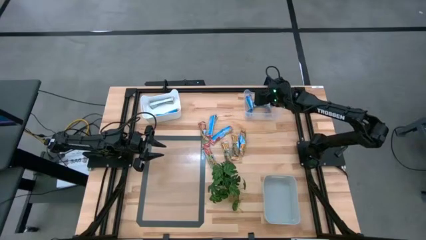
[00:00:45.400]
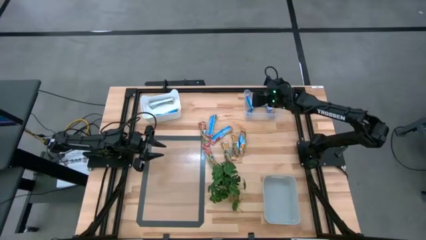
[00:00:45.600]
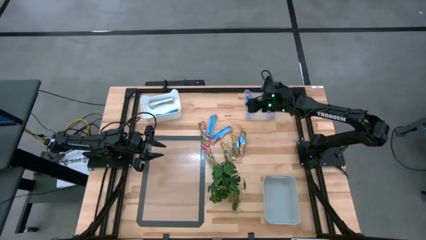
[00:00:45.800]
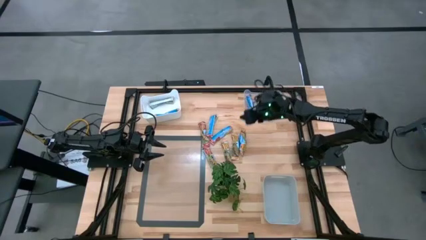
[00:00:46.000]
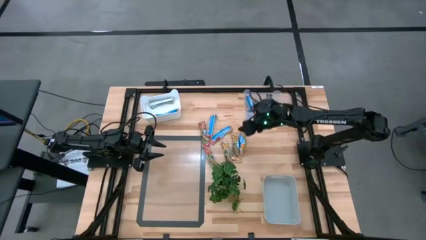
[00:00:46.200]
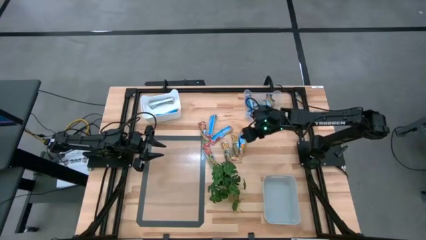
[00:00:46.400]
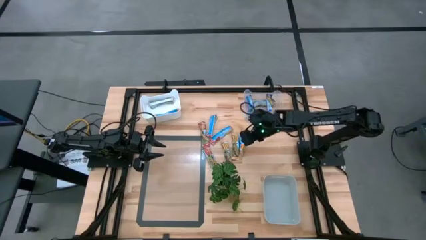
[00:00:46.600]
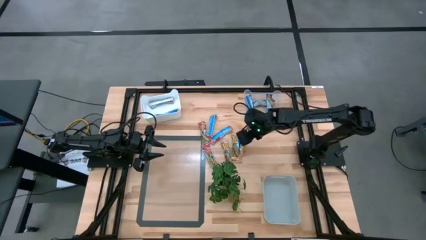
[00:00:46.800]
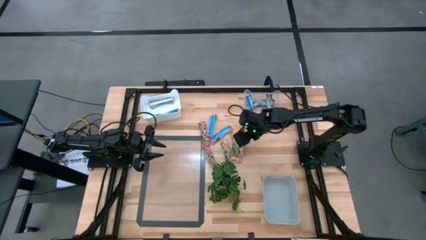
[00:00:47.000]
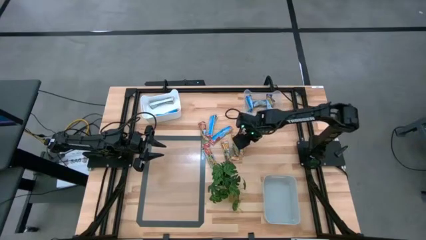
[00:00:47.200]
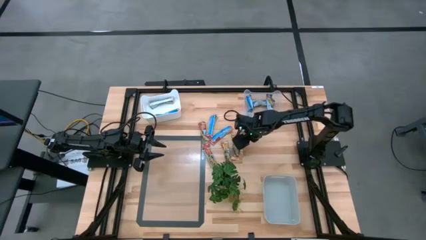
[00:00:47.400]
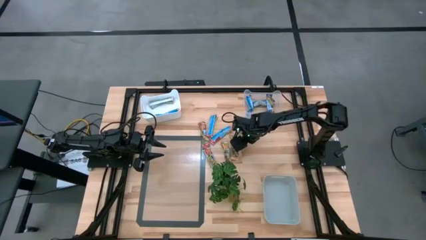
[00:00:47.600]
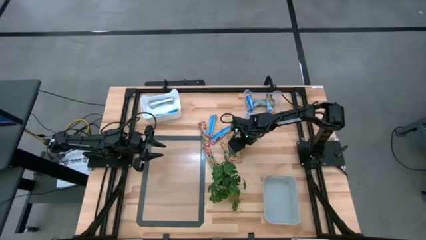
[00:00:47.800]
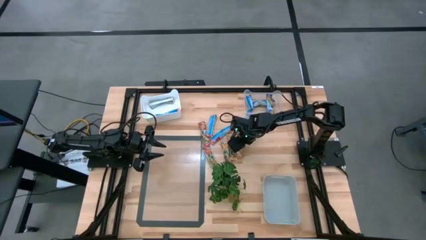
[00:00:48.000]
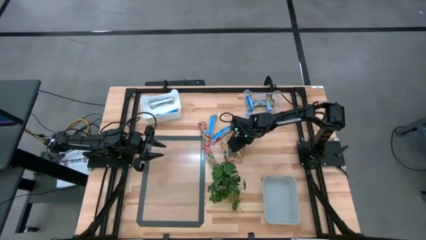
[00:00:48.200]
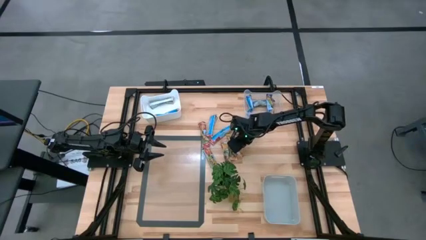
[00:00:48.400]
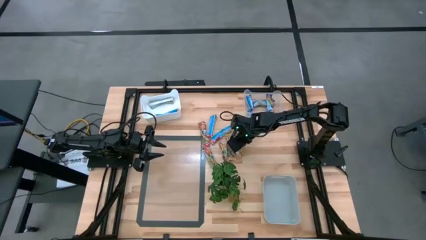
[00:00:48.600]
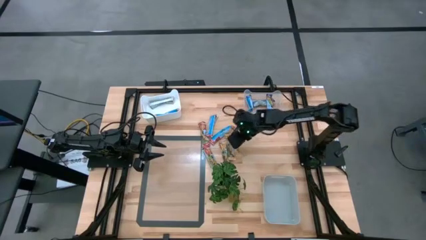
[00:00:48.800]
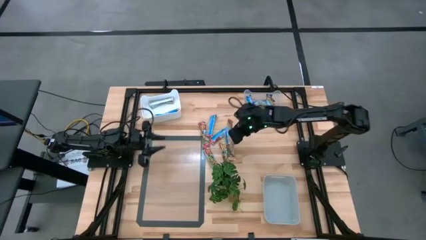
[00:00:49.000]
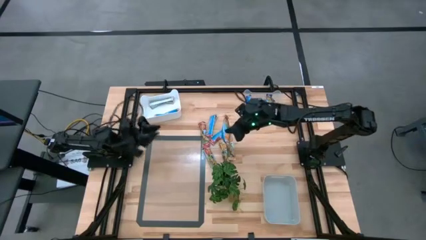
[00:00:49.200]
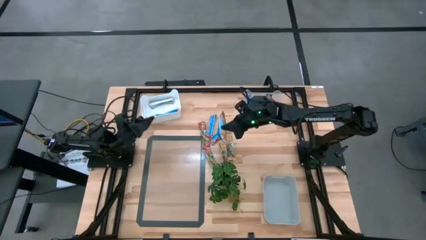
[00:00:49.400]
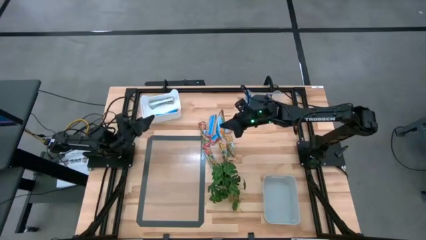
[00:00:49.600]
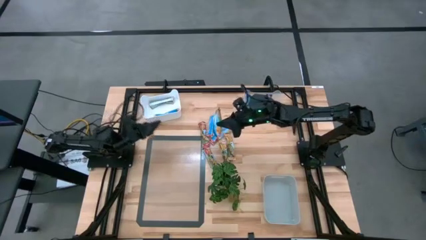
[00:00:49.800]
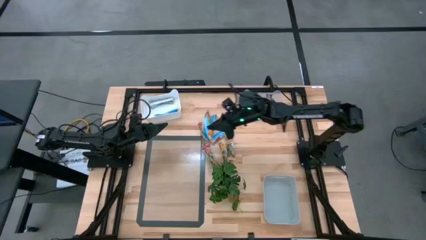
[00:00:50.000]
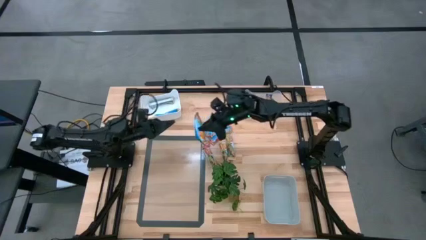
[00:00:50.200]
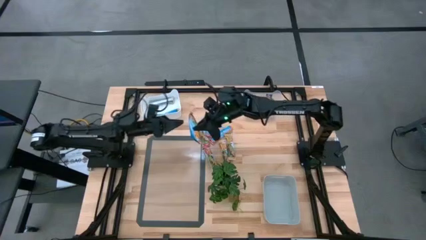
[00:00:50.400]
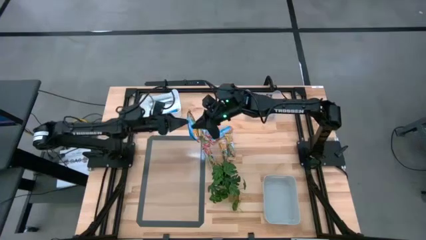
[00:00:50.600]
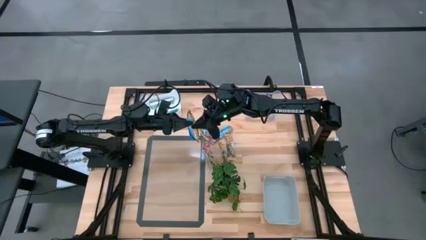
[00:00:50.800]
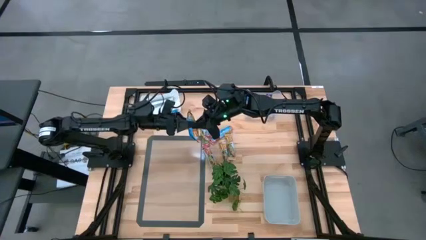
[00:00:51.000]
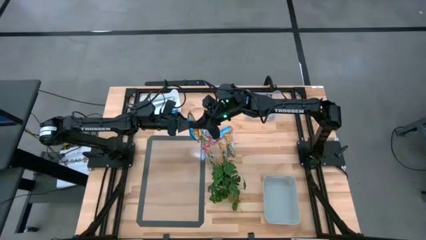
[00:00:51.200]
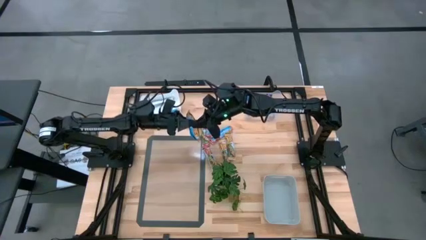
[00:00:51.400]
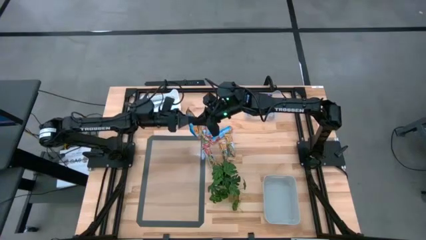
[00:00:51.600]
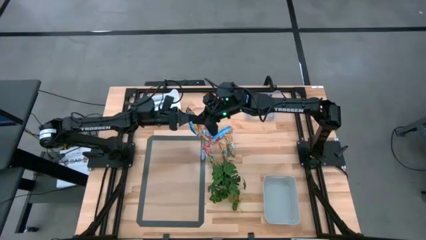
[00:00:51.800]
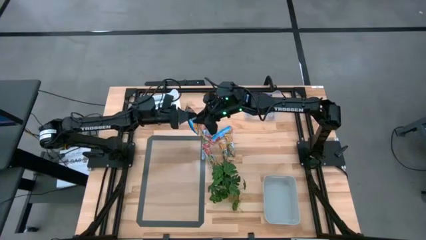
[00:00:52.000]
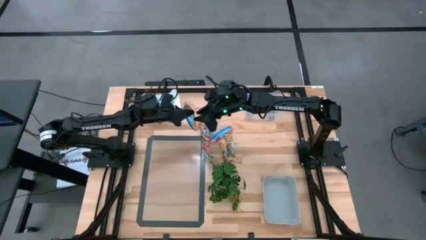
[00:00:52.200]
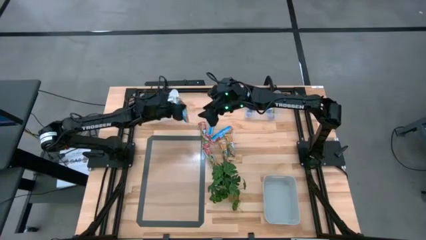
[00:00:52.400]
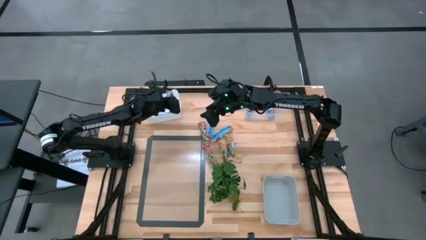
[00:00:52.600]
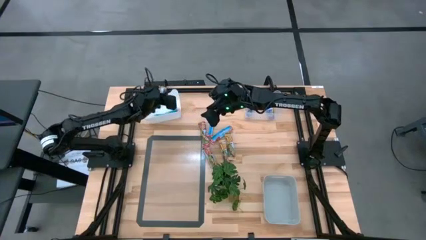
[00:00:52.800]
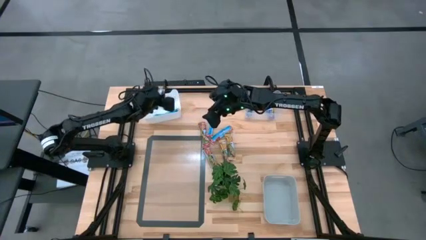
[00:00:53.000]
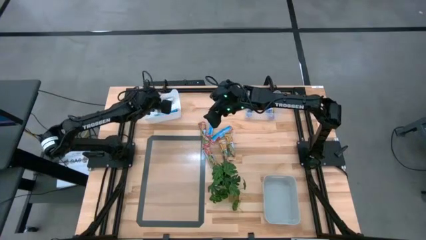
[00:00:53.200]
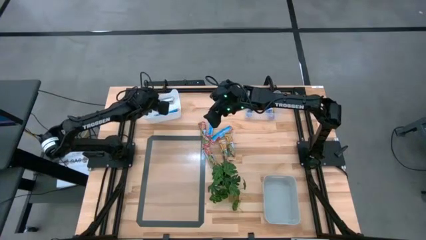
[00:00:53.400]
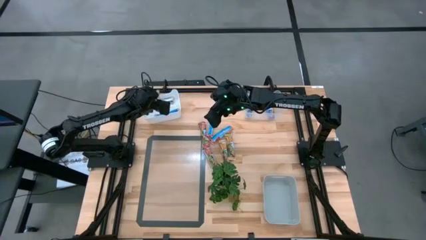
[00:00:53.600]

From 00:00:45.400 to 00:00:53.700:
Task: Pick and place Granola Bars by type
Put the yellow granola bar into the white bin

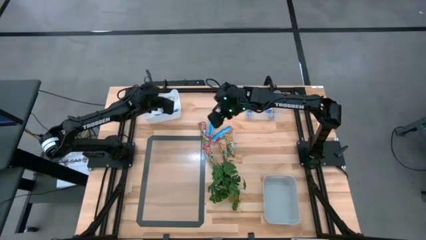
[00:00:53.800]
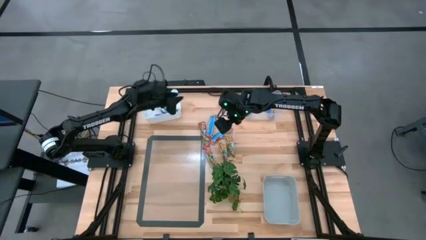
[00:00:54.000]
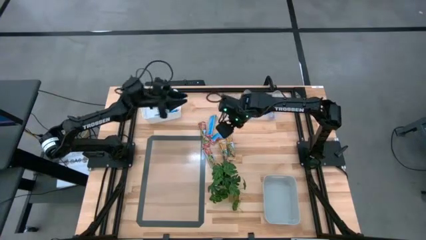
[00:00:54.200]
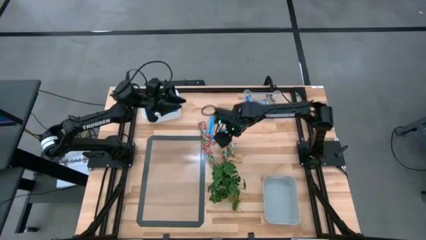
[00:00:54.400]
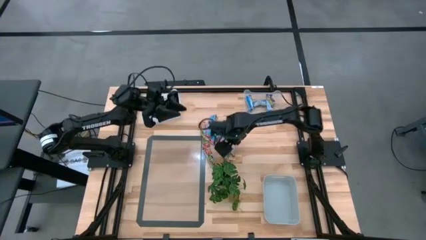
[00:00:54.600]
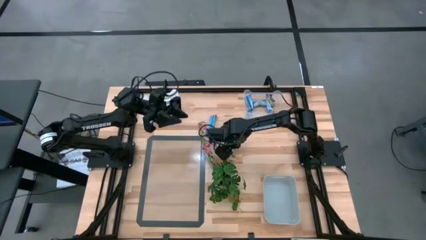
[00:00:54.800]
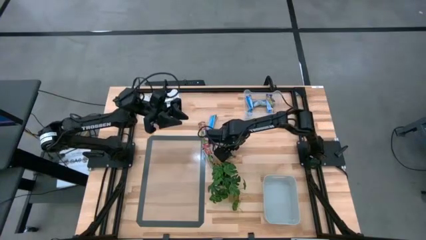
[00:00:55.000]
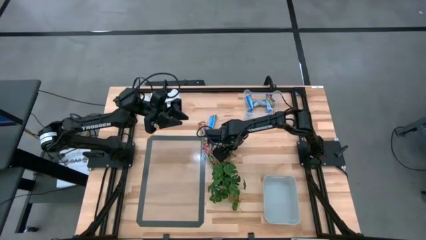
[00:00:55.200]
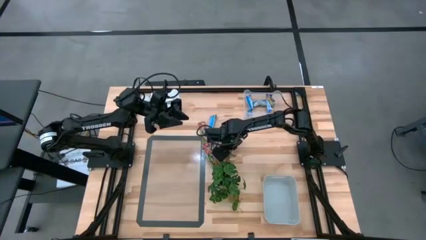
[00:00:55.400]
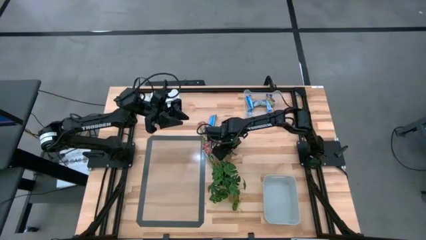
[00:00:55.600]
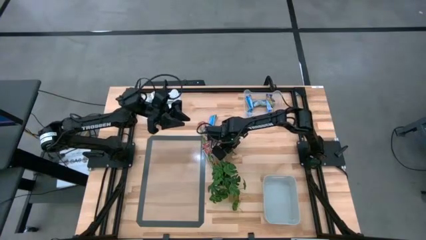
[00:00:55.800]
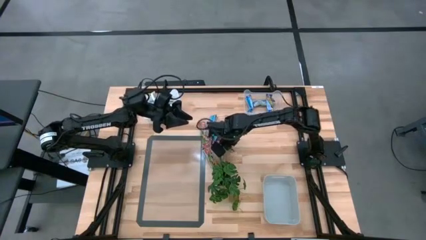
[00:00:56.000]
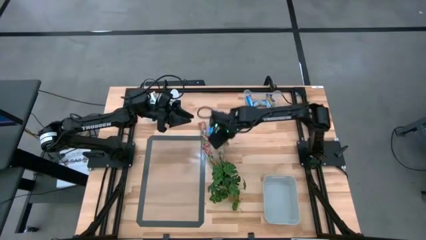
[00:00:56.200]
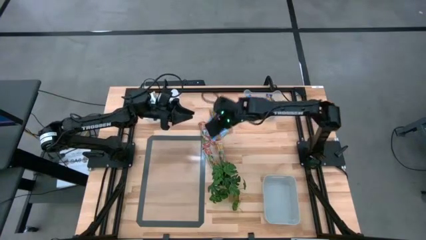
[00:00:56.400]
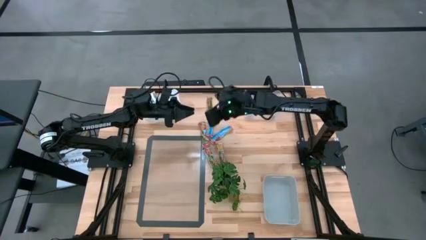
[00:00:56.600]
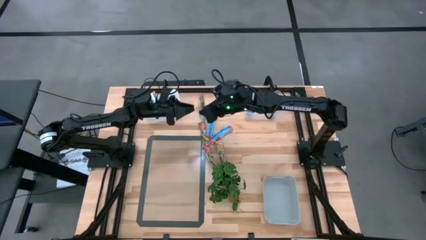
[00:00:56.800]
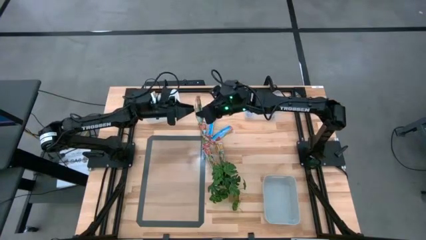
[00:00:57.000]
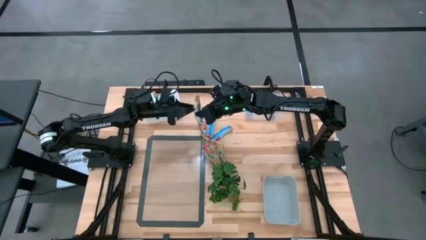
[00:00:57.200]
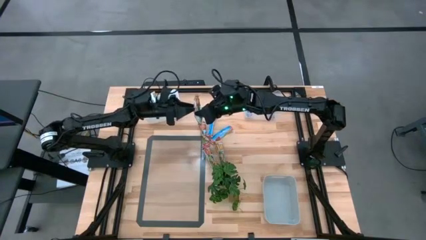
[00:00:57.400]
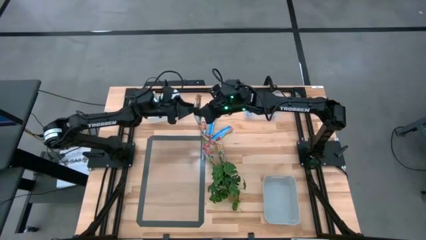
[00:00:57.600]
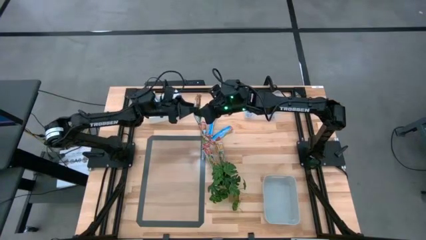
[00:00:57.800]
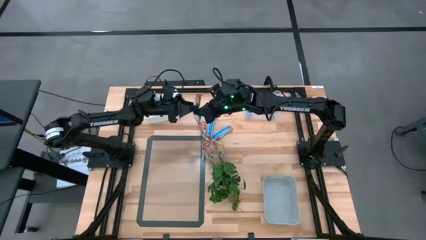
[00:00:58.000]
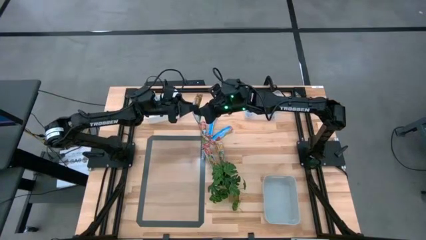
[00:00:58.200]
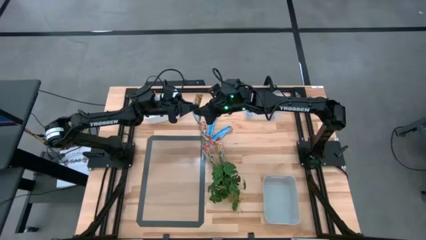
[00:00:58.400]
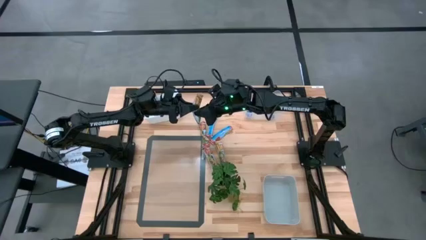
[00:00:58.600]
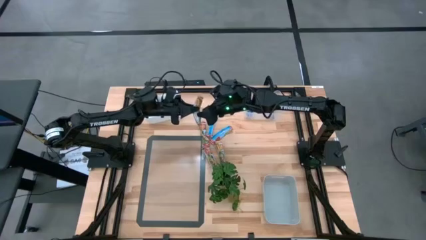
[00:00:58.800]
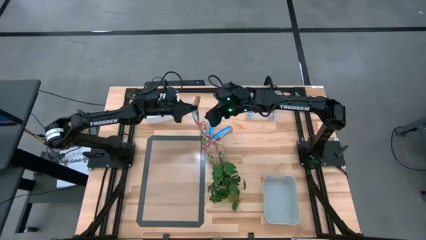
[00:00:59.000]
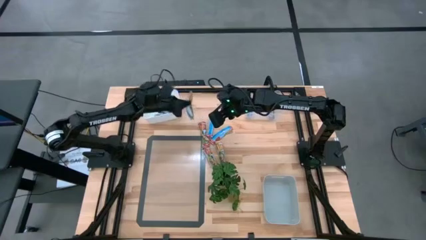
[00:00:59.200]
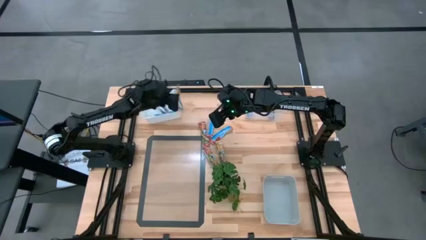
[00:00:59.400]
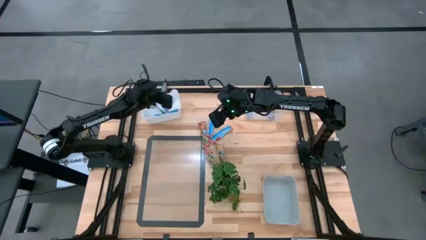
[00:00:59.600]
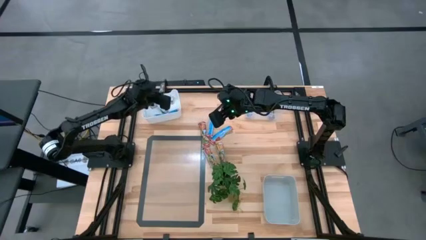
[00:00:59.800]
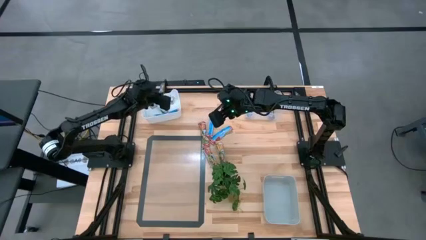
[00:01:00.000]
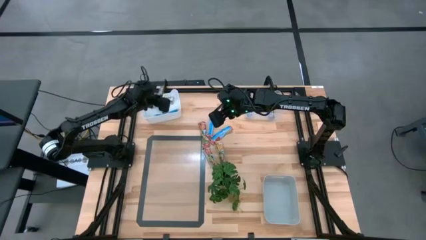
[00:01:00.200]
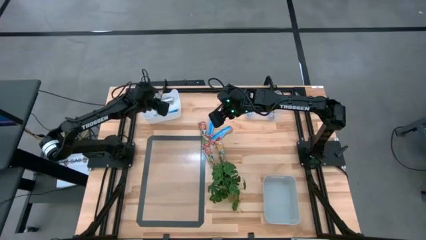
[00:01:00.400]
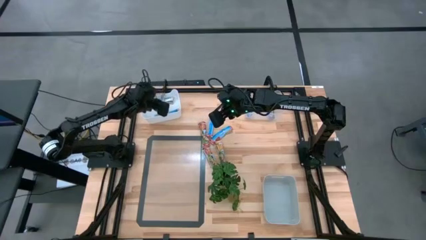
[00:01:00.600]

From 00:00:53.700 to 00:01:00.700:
Put the yellow granola bar into the white bin
